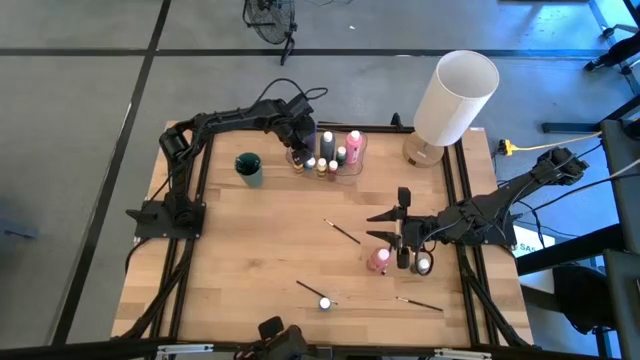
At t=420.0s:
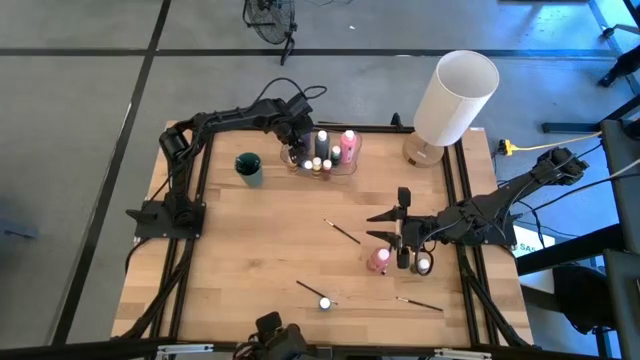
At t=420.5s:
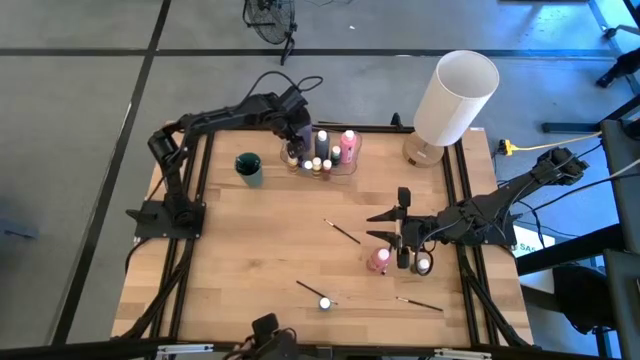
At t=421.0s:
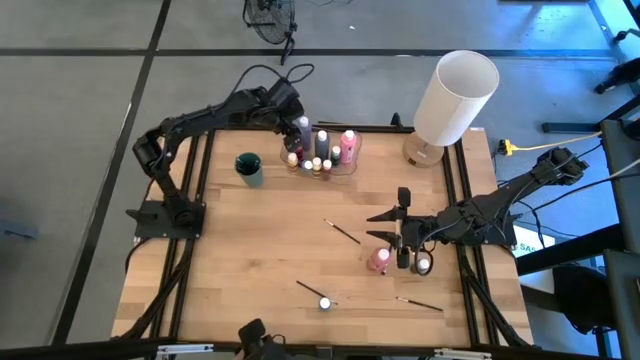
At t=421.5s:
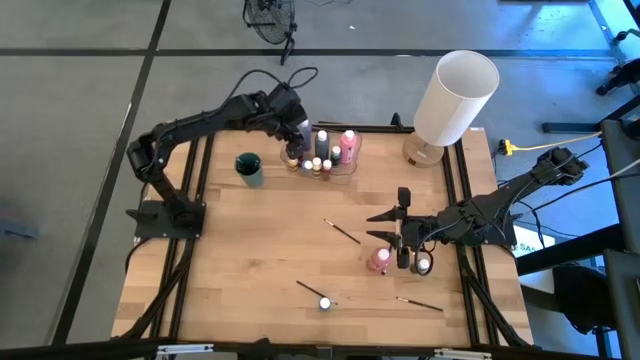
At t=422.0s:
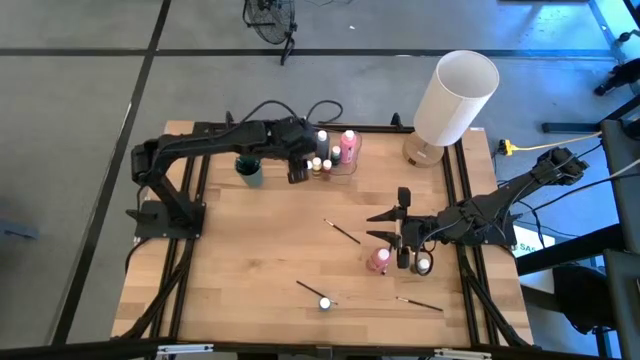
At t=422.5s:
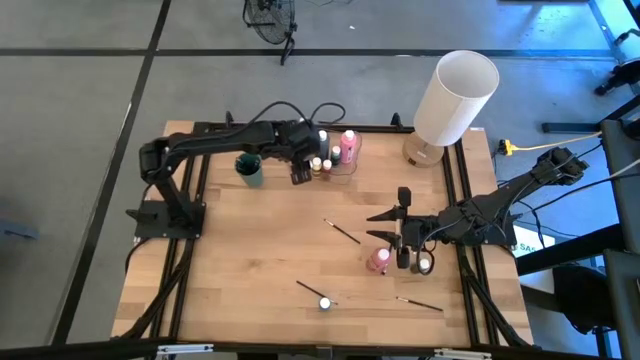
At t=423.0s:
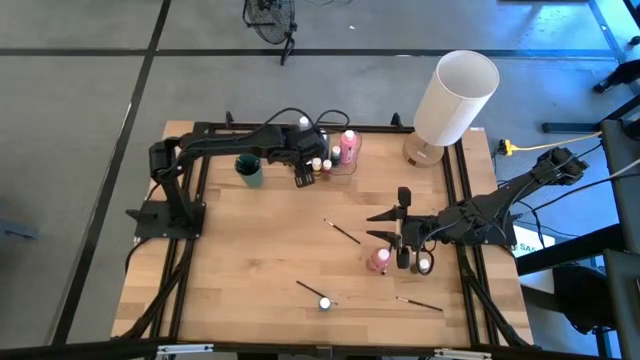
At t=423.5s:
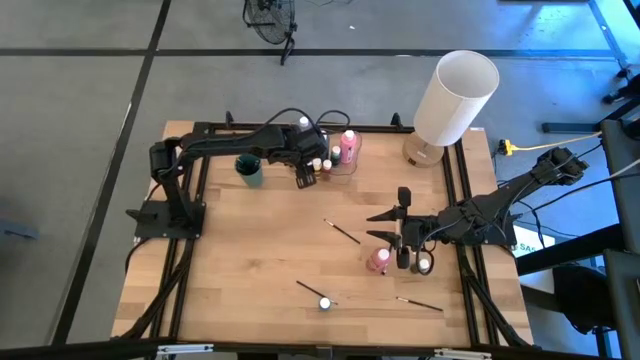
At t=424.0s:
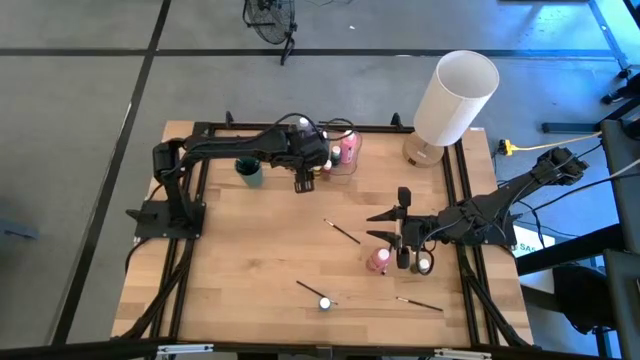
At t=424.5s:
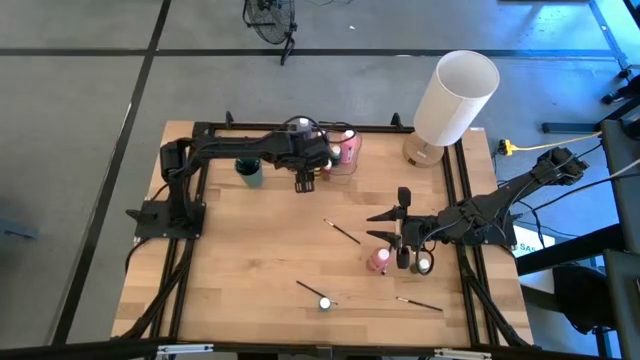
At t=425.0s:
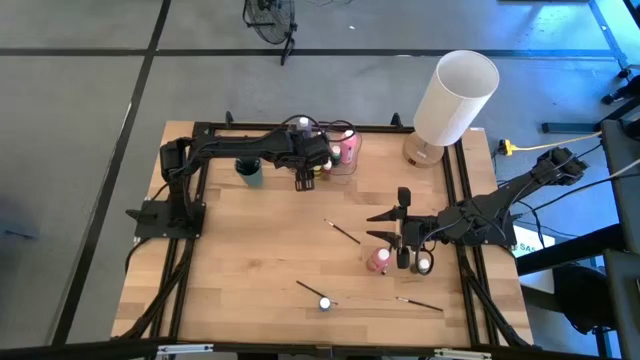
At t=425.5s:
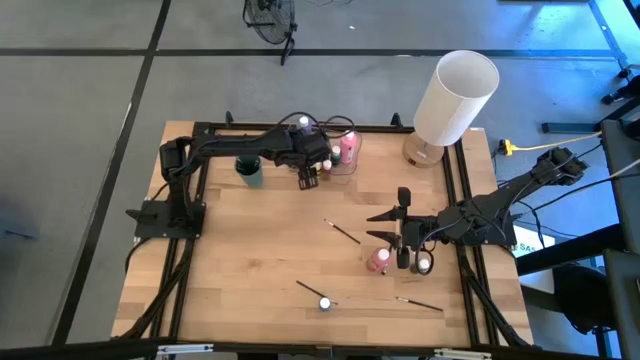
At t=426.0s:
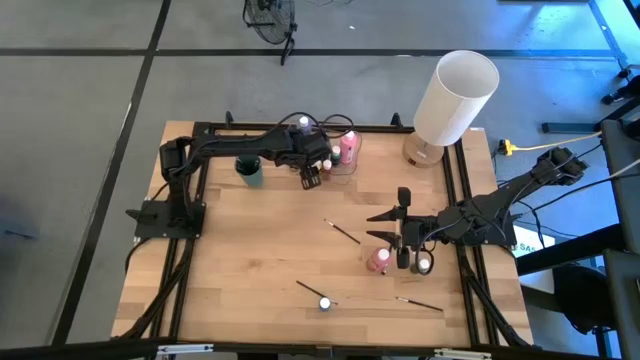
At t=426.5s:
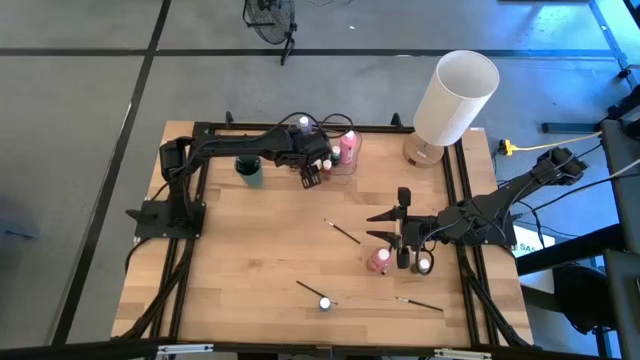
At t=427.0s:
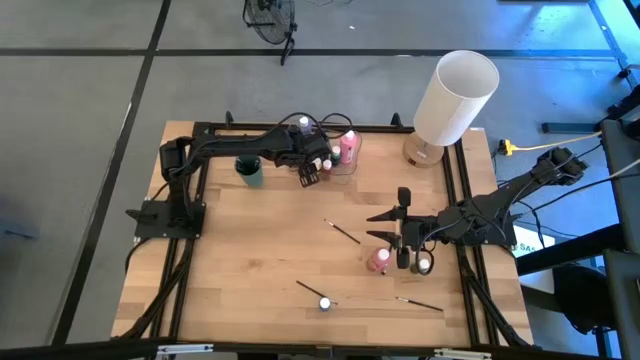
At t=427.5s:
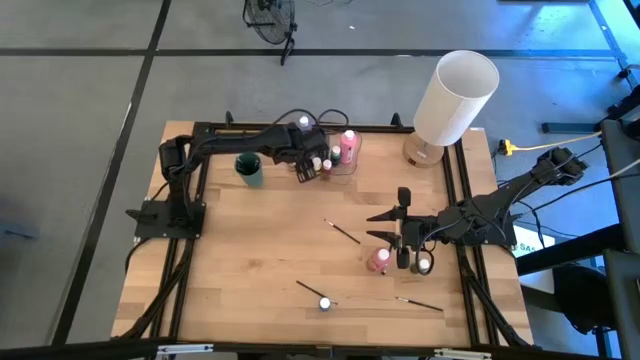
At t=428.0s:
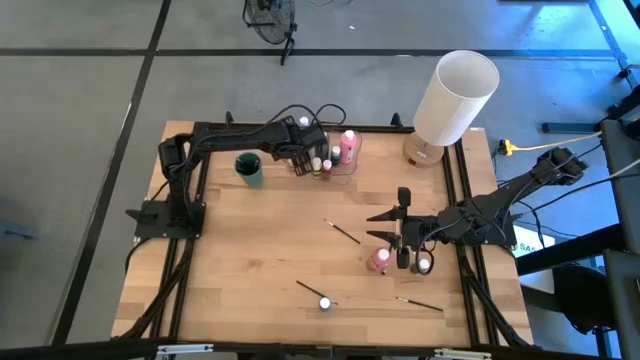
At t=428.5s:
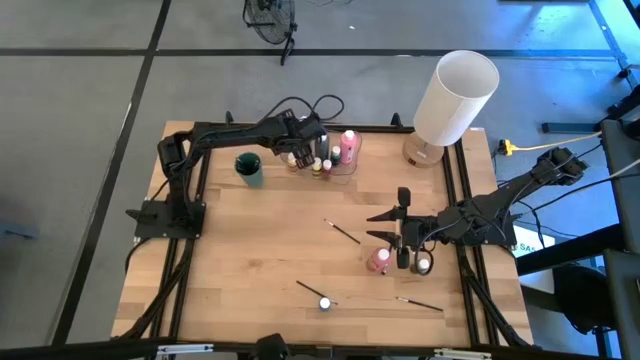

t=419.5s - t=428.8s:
Task: Pick & Place Paint Supplies
Adjust the blue paint bottle on the transparent bin

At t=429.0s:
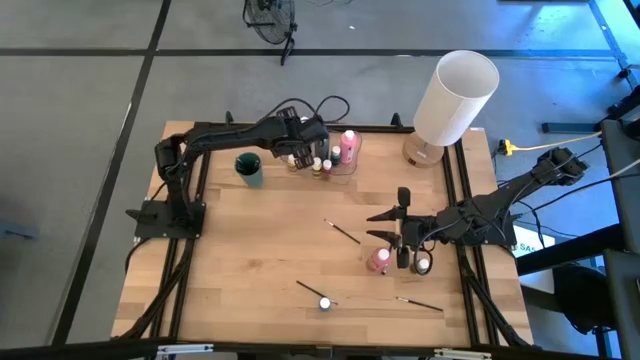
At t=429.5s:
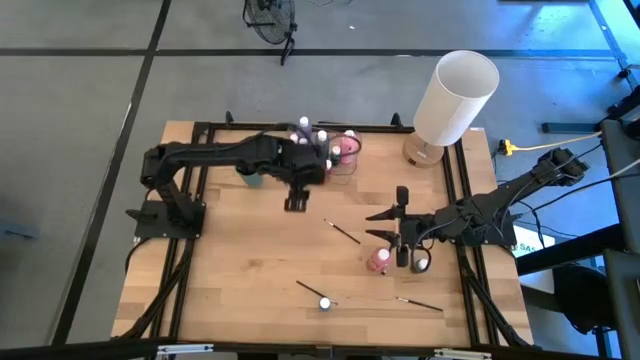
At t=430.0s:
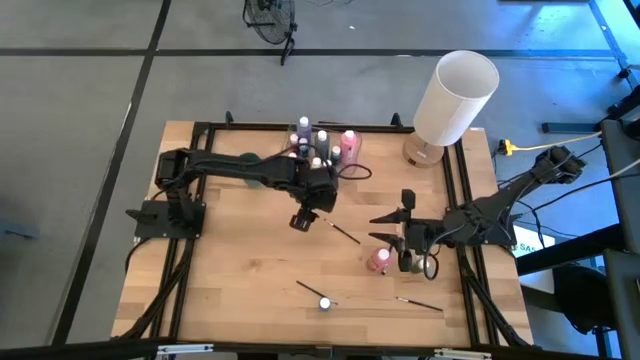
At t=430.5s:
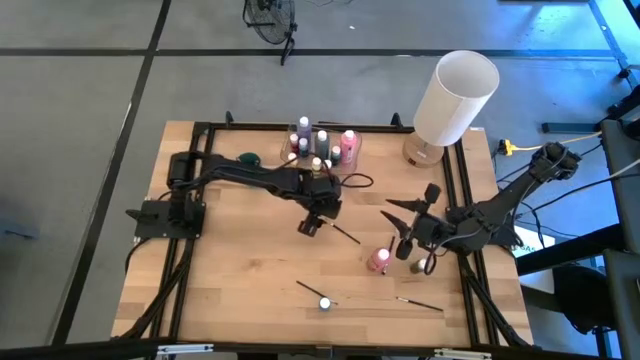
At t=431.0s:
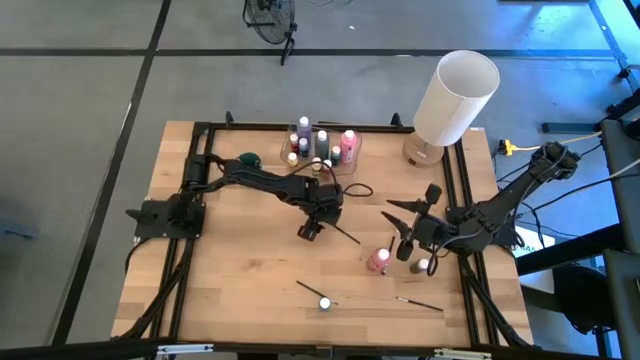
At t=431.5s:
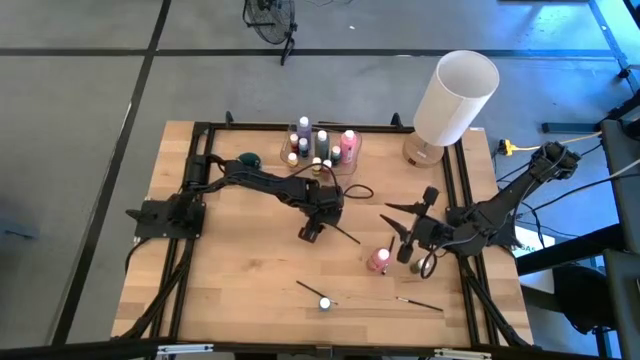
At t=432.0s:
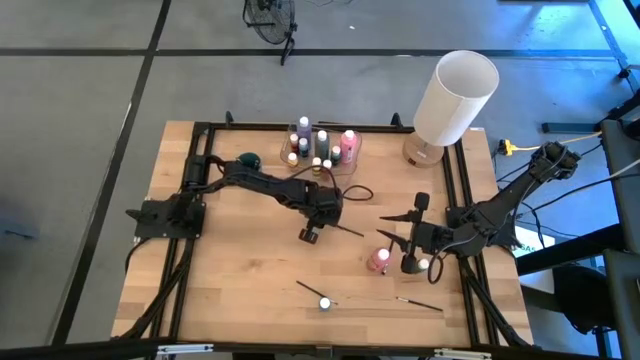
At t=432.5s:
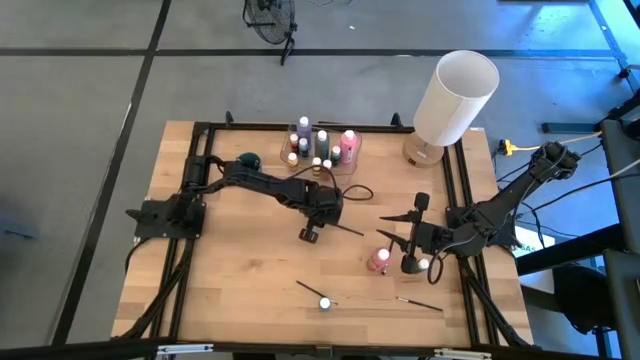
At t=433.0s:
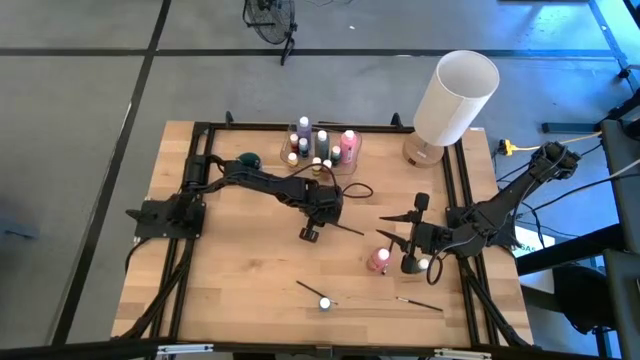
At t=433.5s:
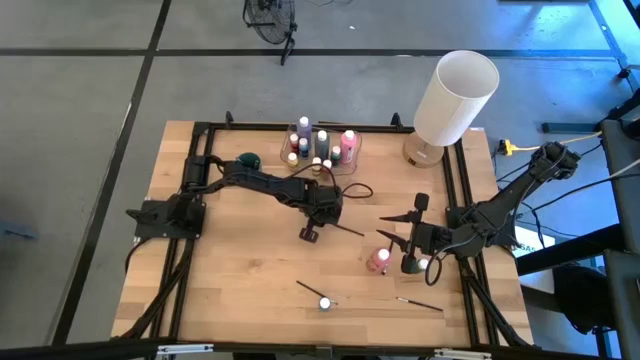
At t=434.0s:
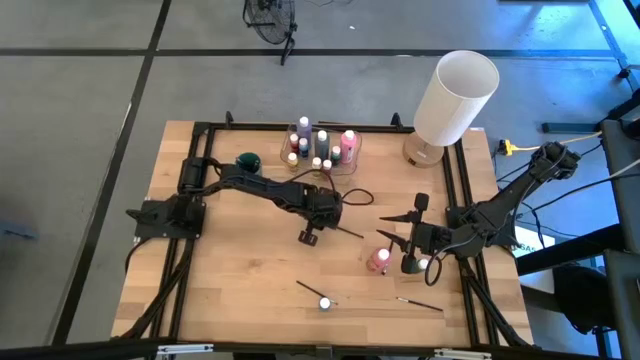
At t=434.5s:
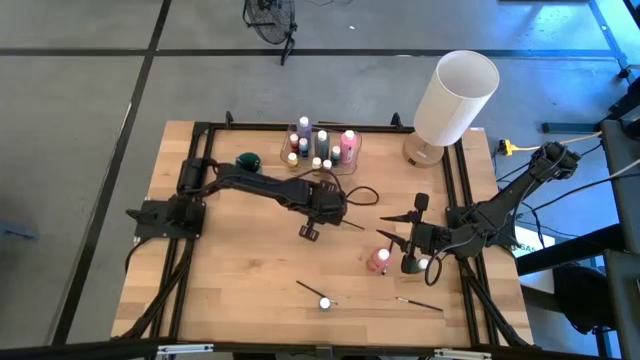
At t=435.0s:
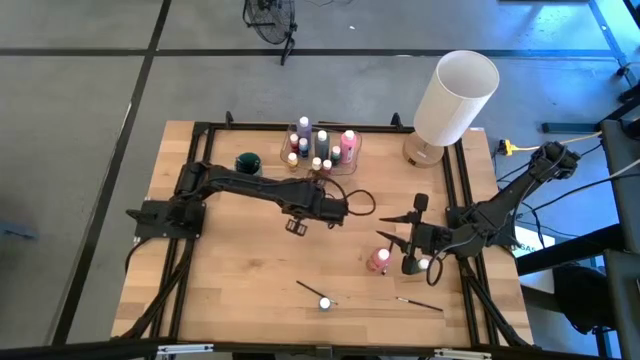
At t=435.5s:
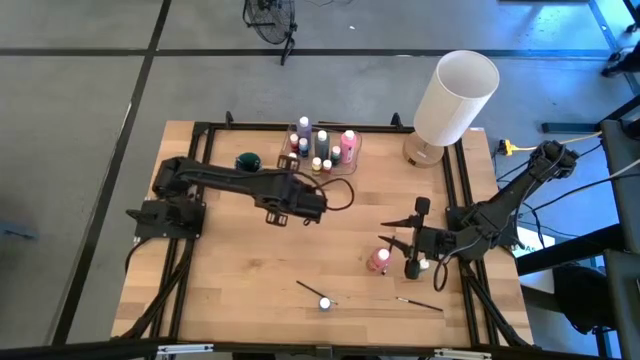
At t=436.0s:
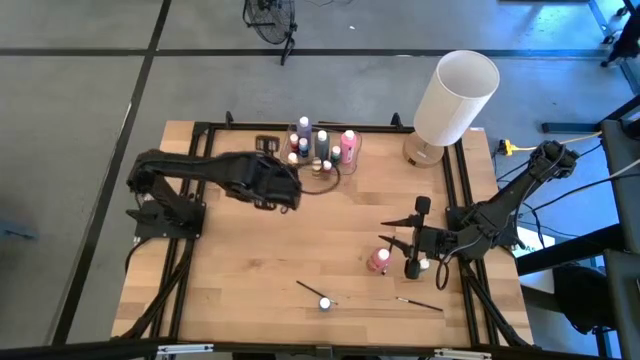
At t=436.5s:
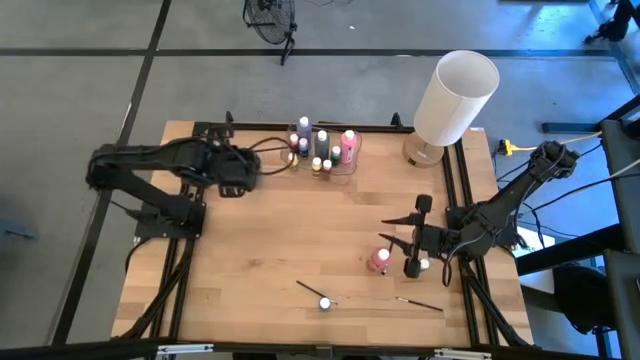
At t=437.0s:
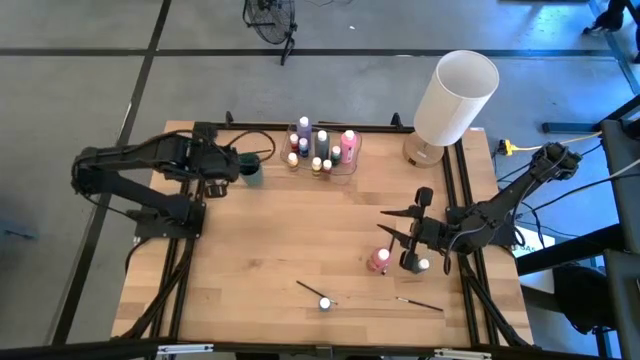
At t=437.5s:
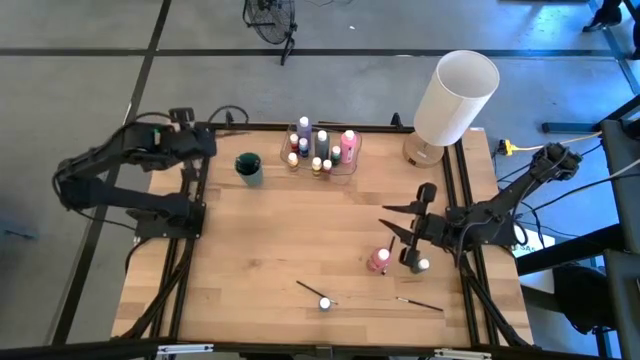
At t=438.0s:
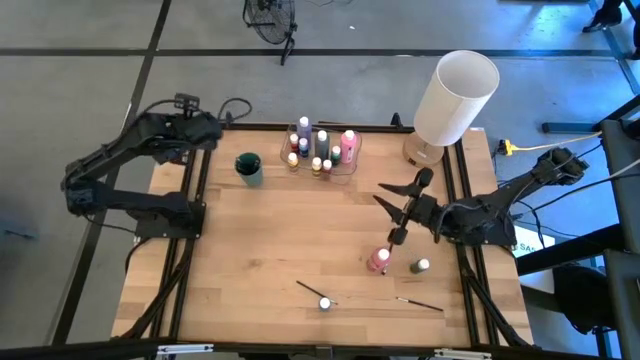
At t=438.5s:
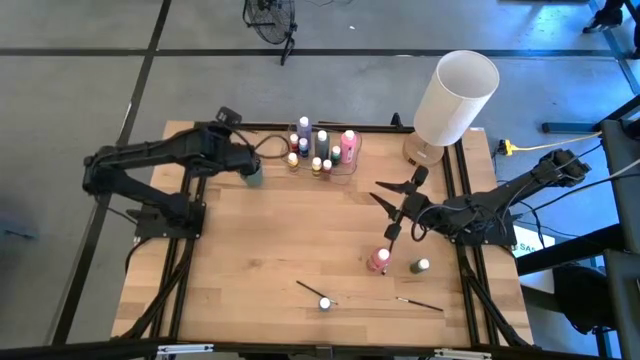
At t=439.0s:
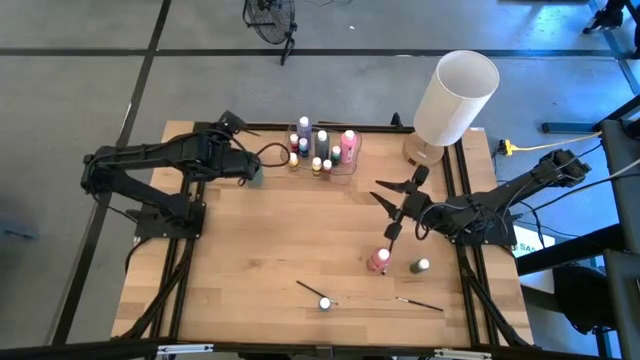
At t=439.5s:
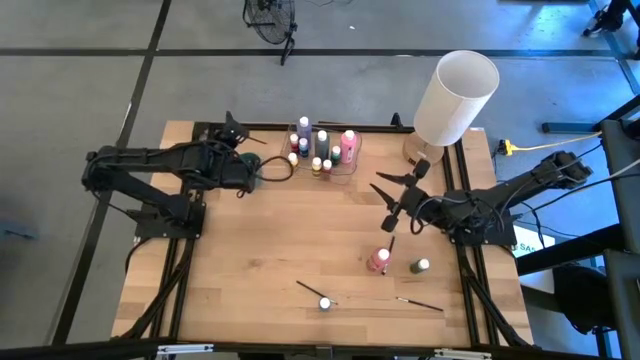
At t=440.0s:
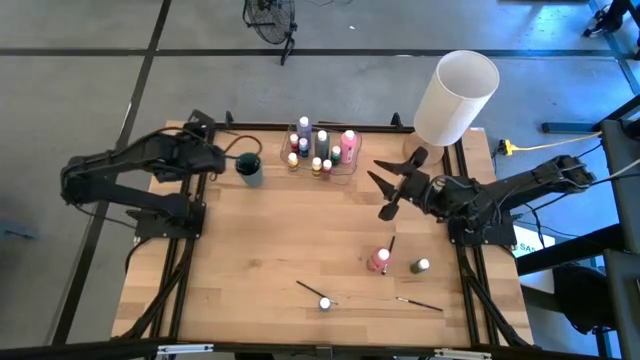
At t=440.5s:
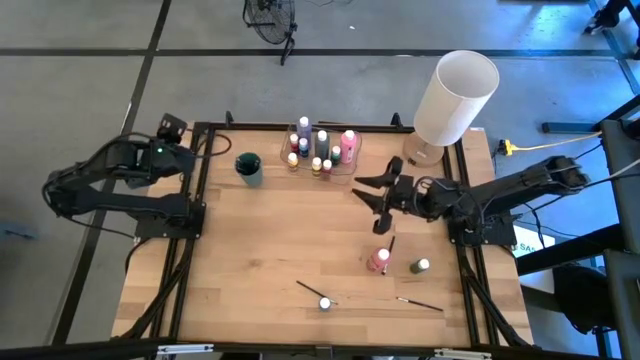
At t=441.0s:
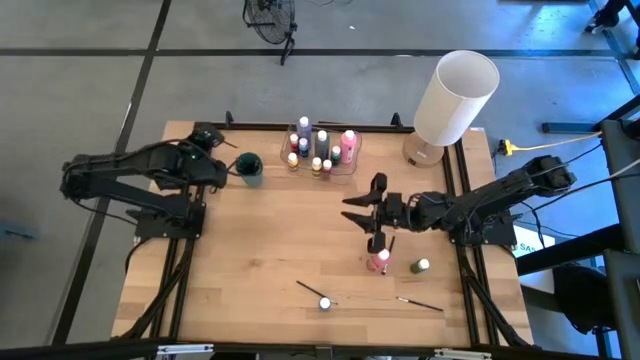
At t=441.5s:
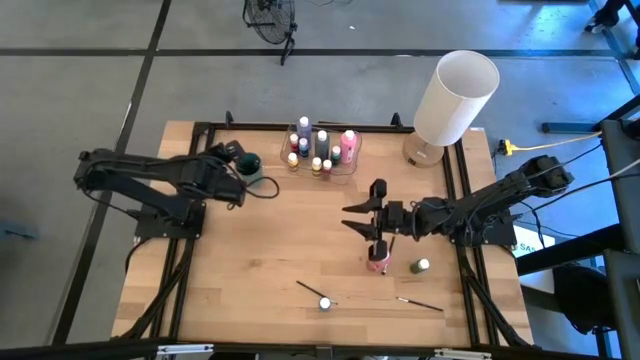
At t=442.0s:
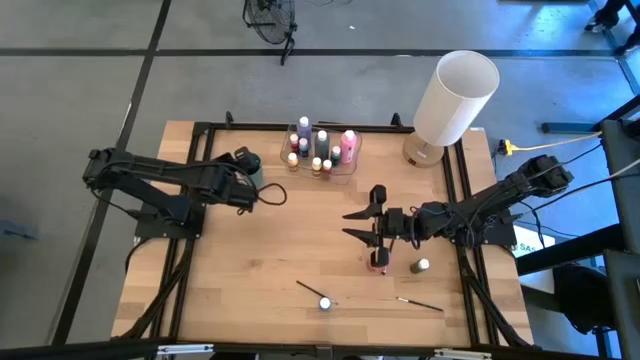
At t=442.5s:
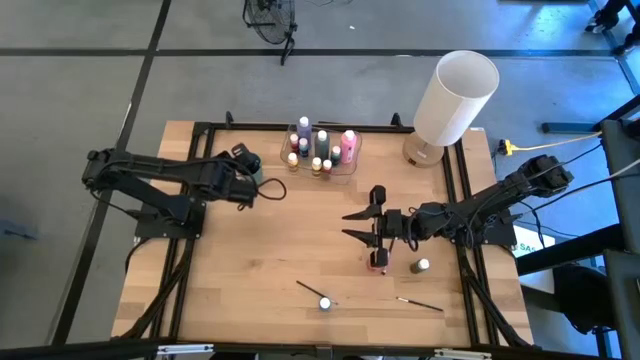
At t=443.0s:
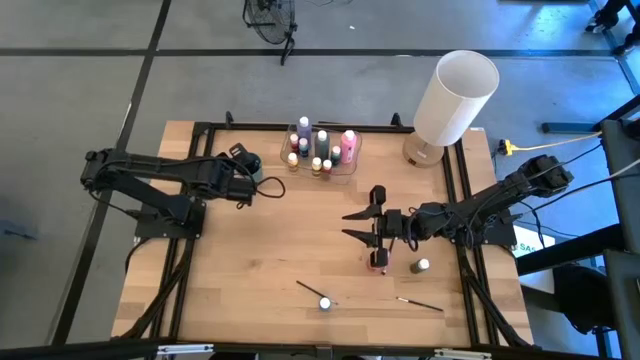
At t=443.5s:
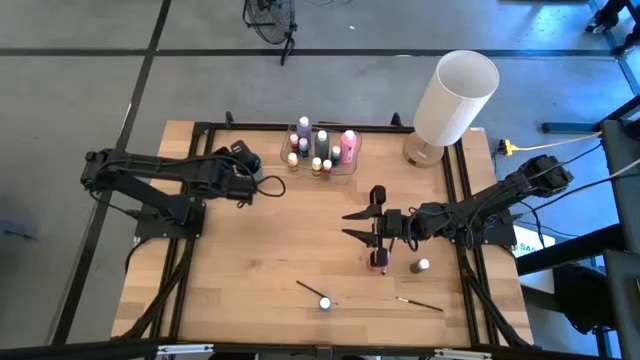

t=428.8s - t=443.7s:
Put the silver paint brush into the green cup
